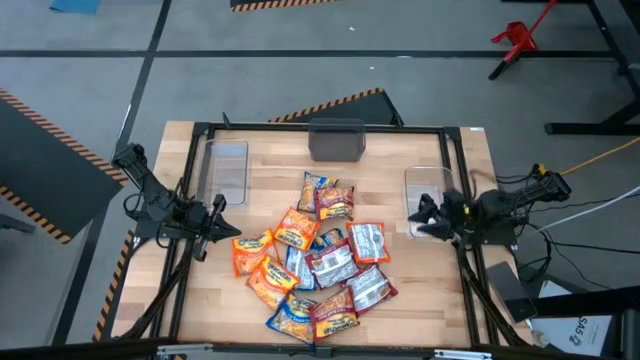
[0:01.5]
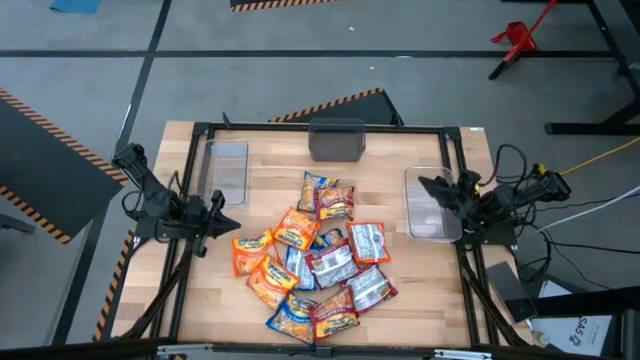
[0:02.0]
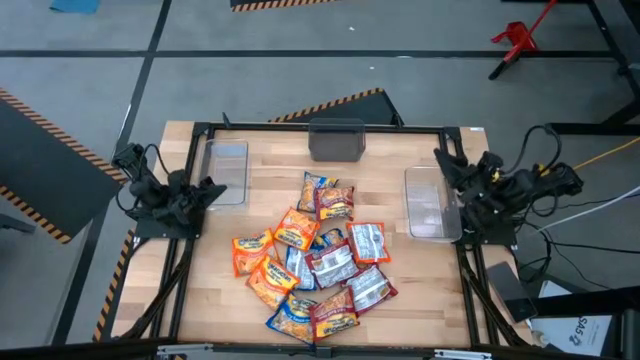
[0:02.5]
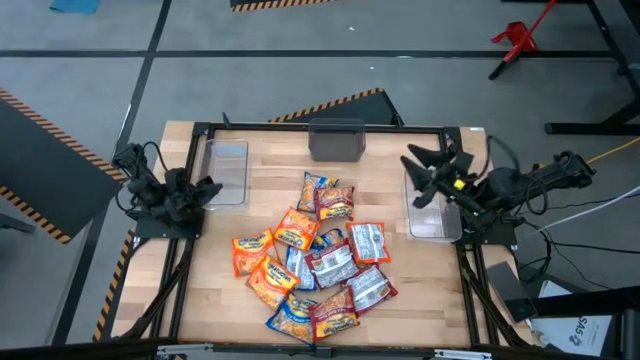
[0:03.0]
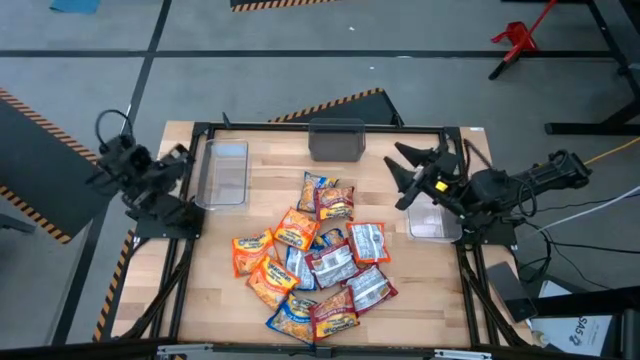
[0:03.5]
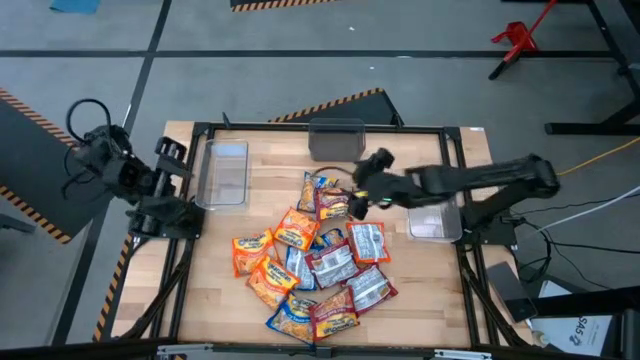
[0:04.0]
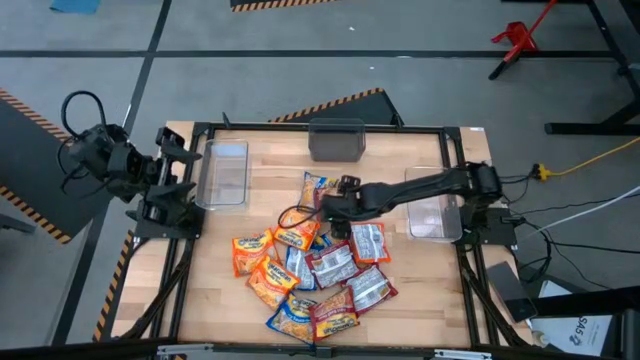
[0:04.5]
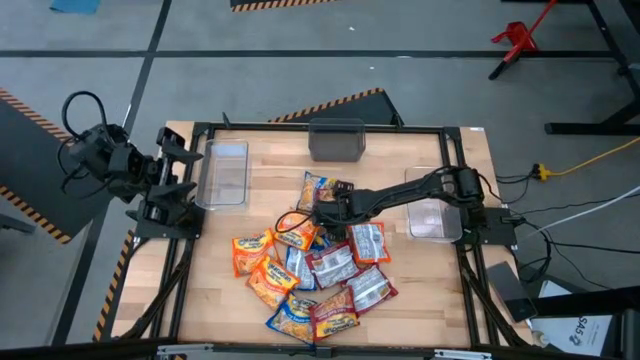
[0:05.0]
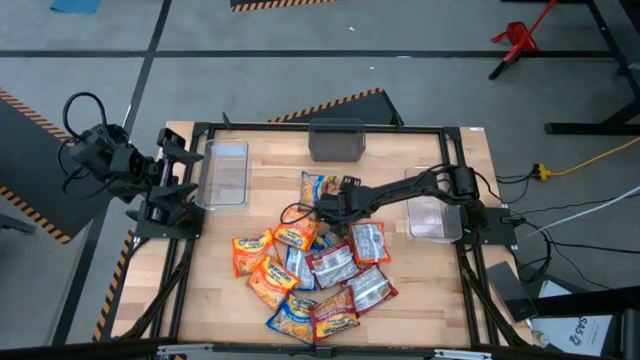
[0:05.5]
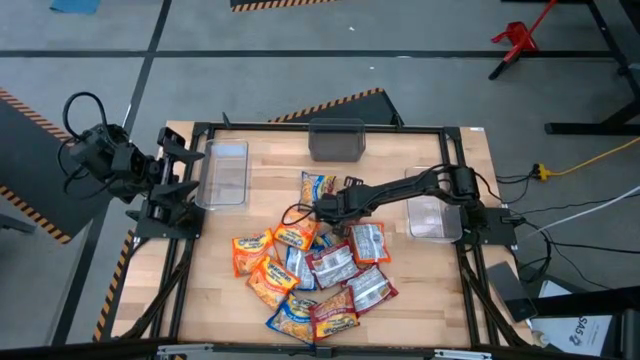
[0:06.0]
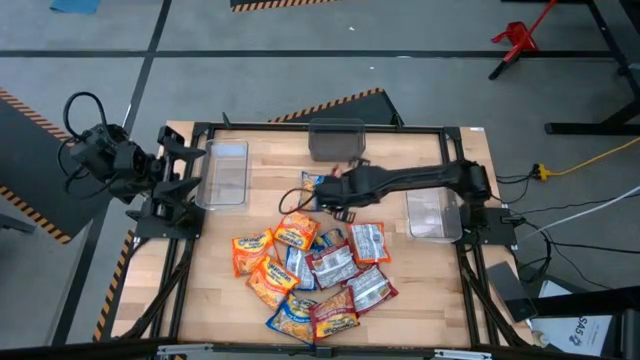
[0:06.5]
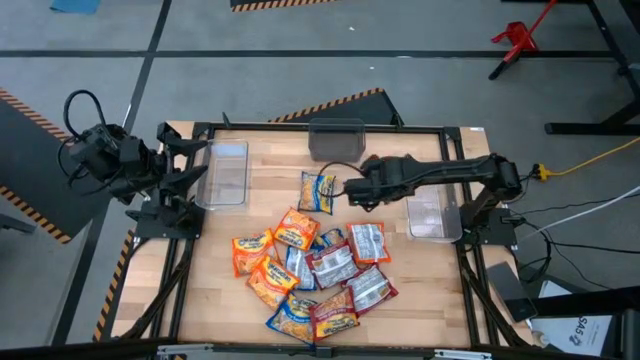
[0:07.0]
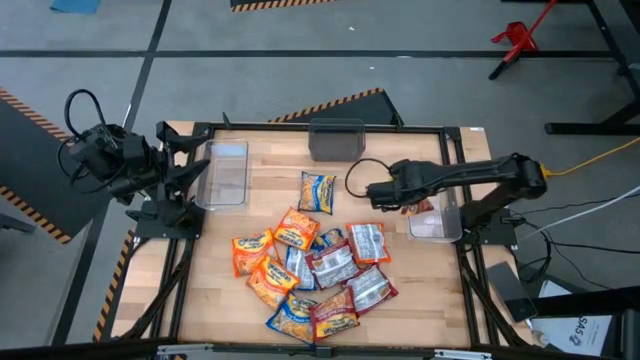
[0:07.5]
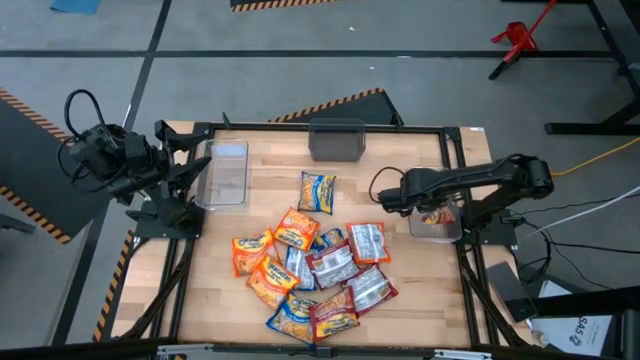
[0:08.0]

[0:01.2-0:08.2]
Task: Sort Maruchan noodles
Put the red noodle pack into the right transparent bin

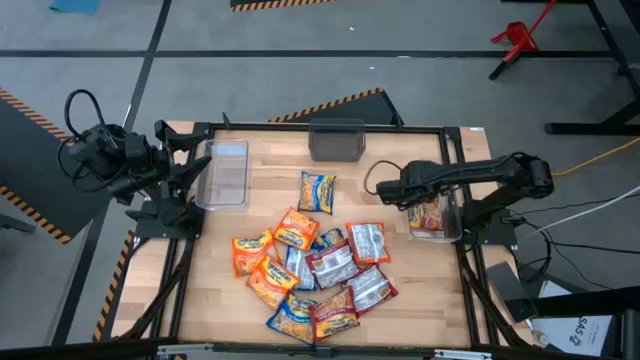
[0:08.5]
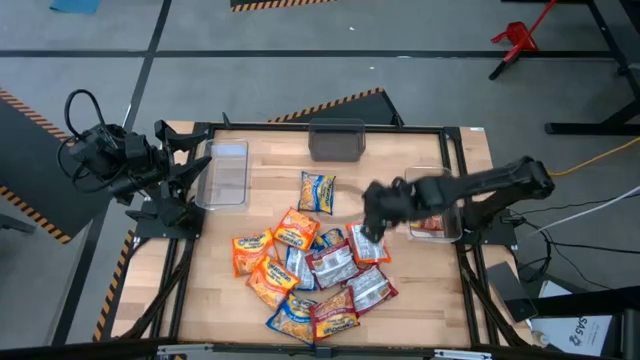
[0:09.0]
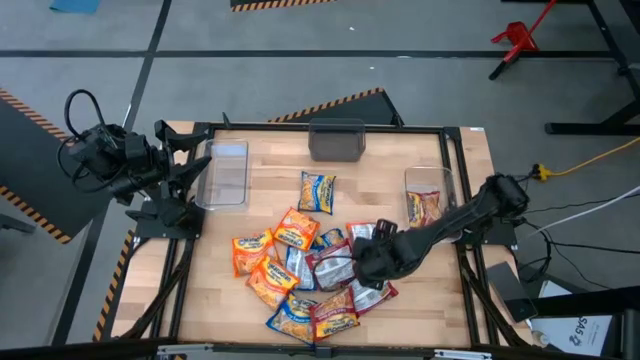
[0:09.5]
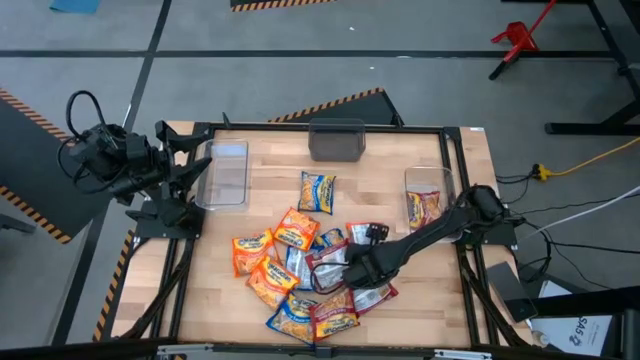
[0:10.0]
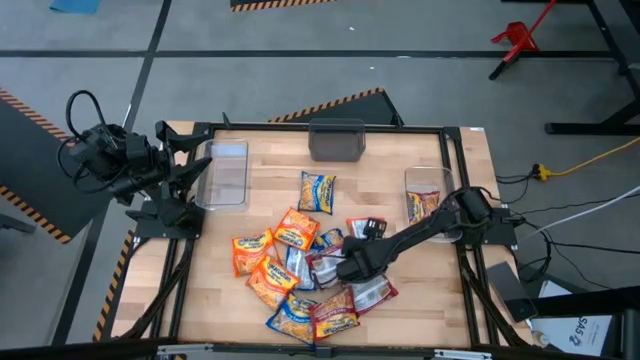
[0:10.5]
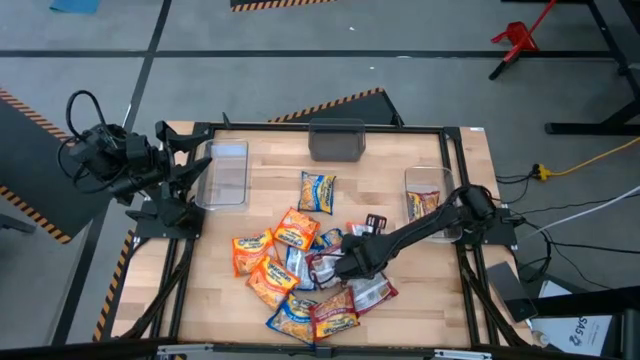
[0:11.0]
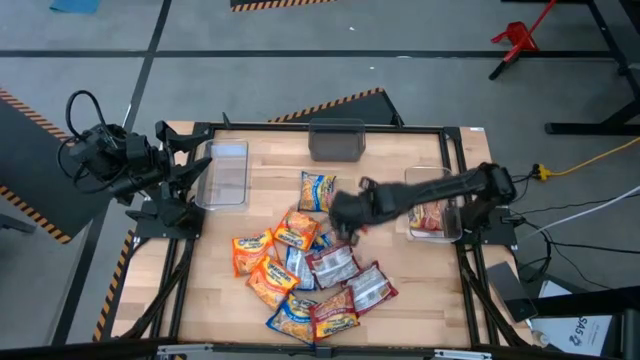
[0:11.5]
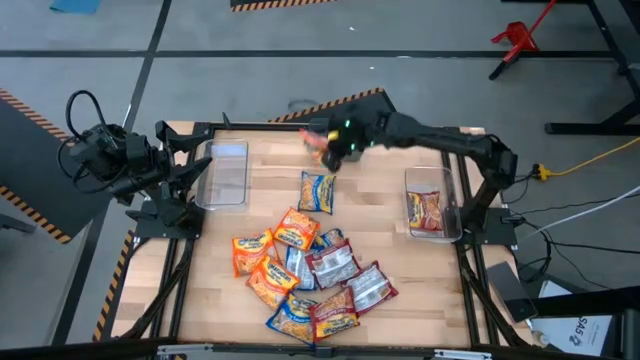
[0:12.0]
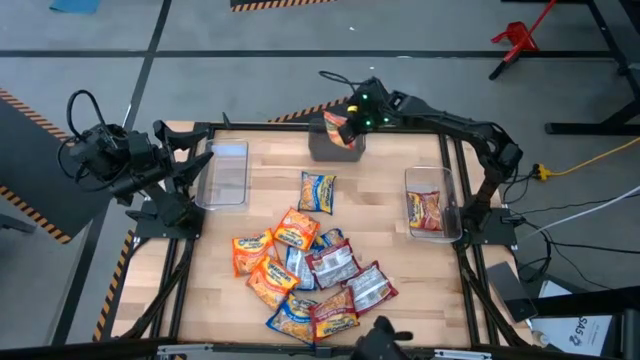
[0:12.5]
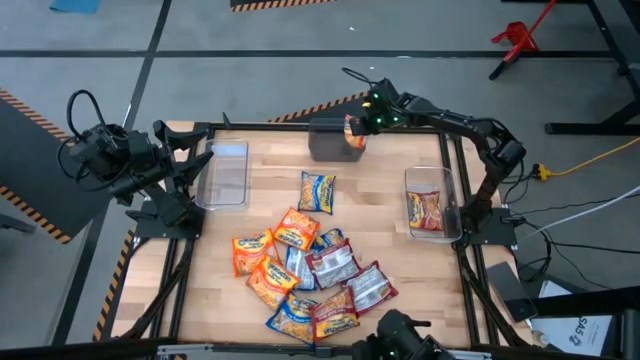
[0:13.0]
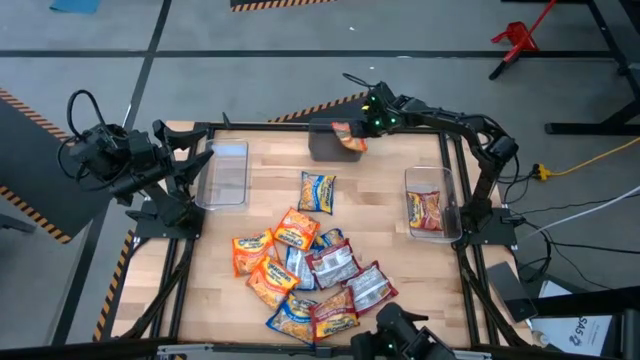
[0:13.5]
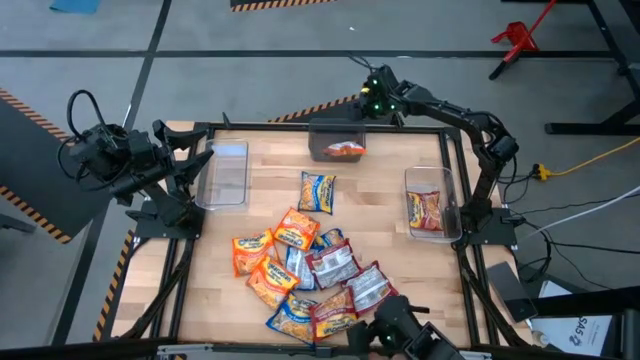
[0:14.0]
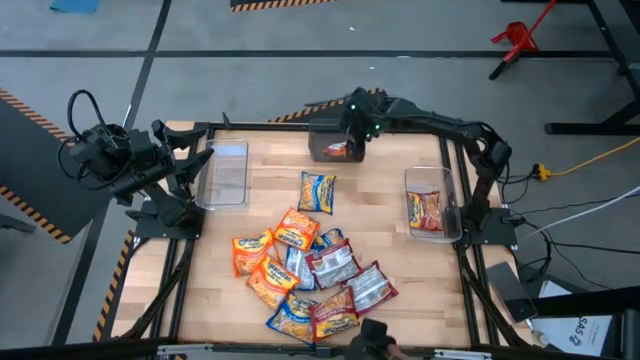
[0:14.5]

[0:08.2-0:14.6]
Put the orange noodle pack into the black bin

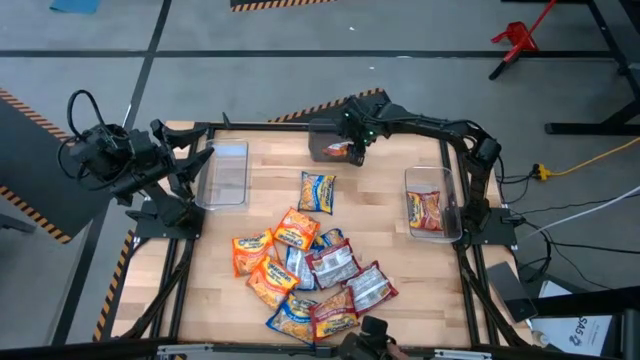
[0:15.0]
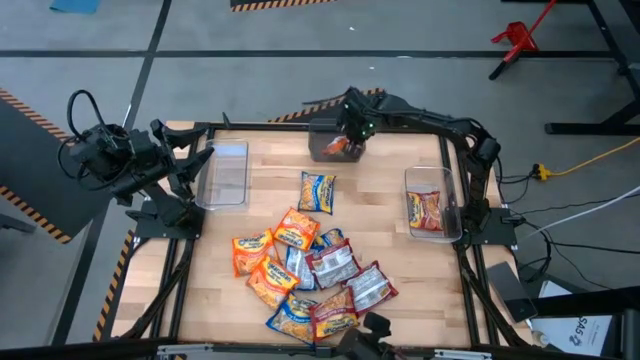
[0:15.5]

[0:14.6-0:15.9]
Put the orange noodle pack into the black bin

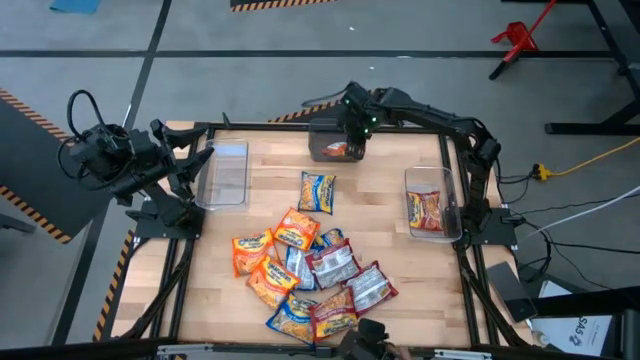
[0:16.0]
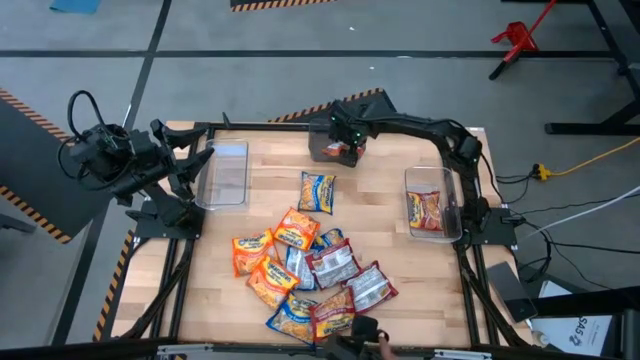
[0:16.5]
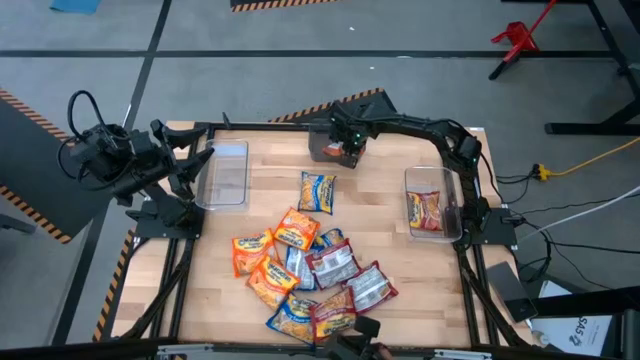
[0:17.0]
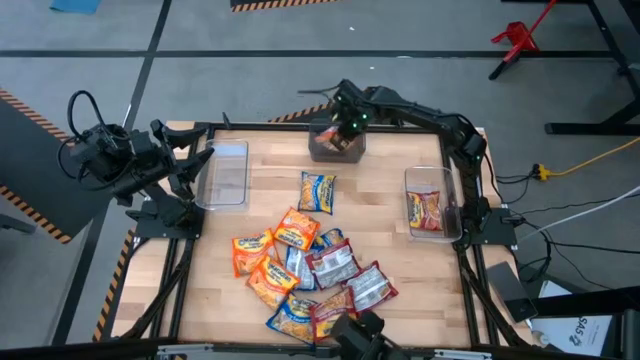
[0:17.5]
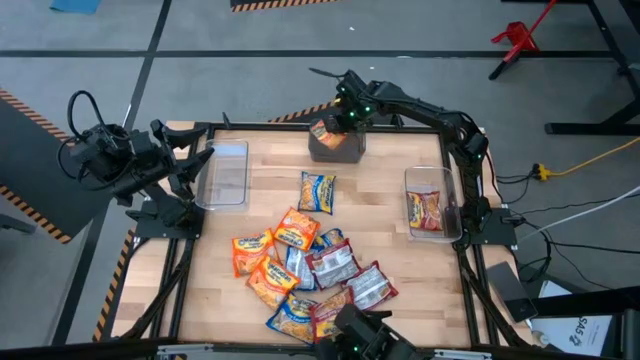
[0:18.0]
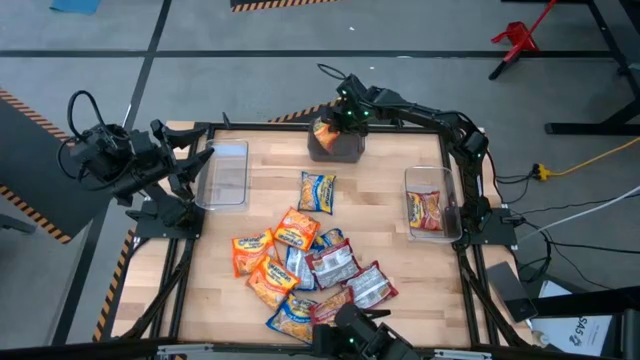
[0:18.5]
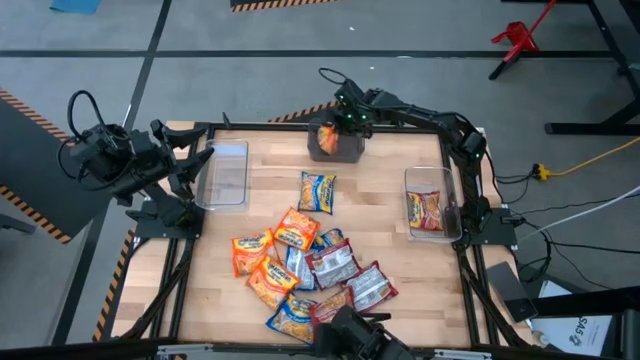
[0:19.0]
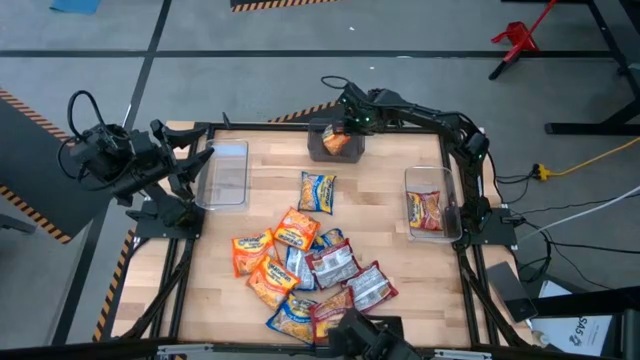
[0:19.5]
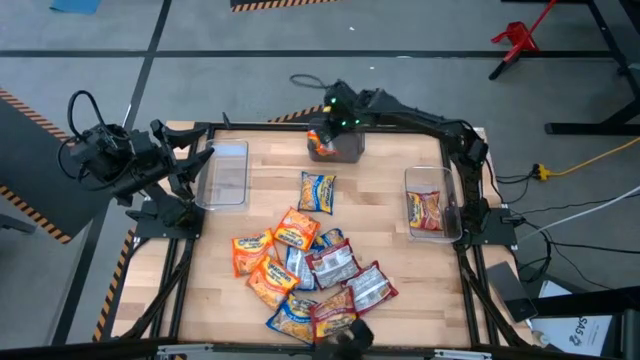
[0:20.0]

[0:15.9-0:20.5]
Put the orange noodle pack into the black bin

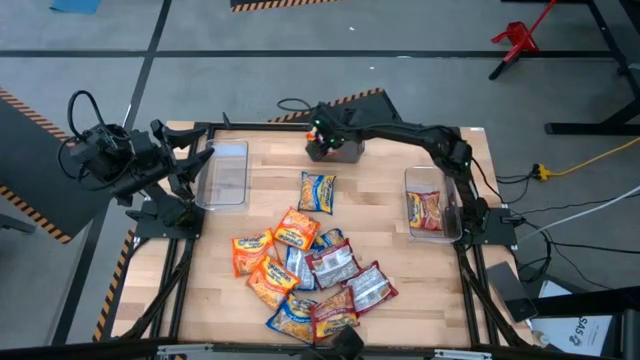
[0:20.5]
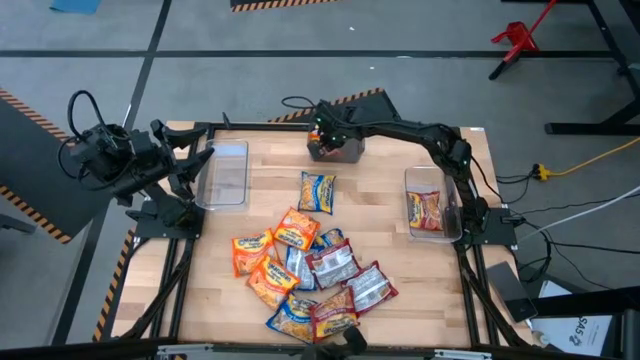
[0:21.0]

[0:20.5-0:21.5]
Put the orange noodle pack into the black bin

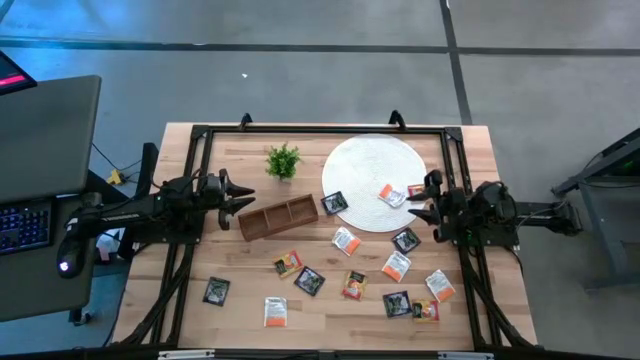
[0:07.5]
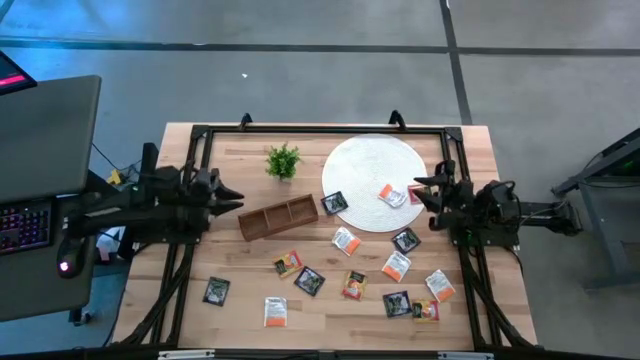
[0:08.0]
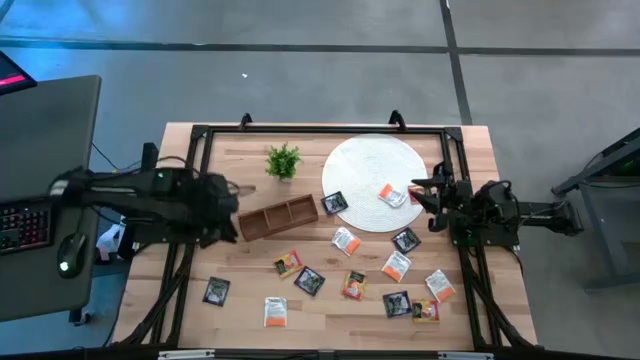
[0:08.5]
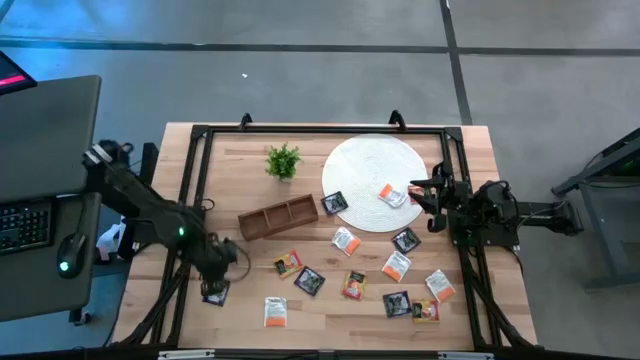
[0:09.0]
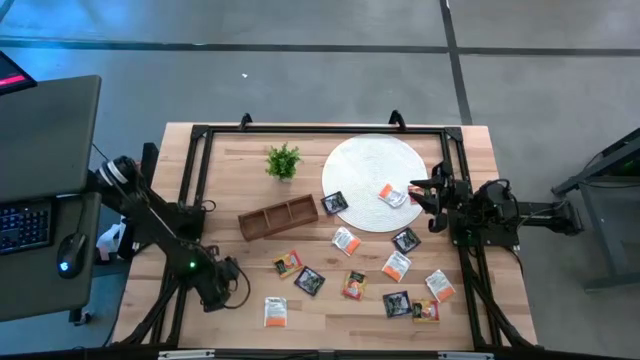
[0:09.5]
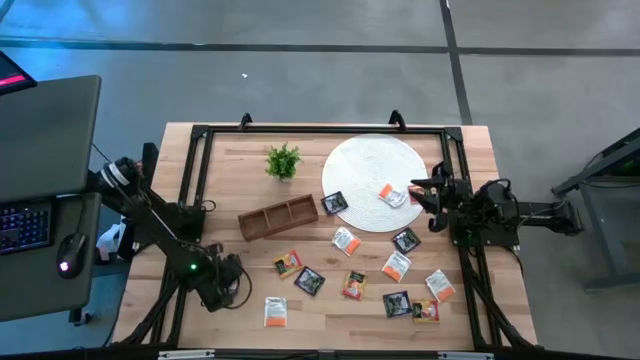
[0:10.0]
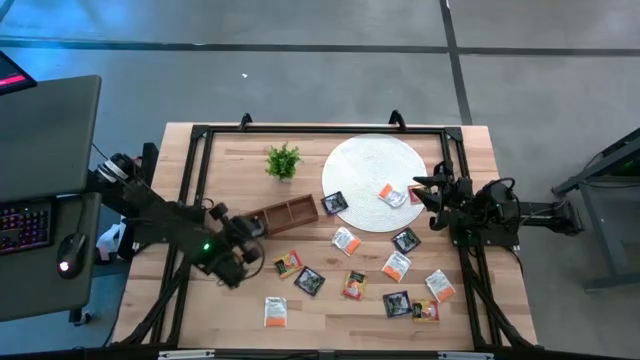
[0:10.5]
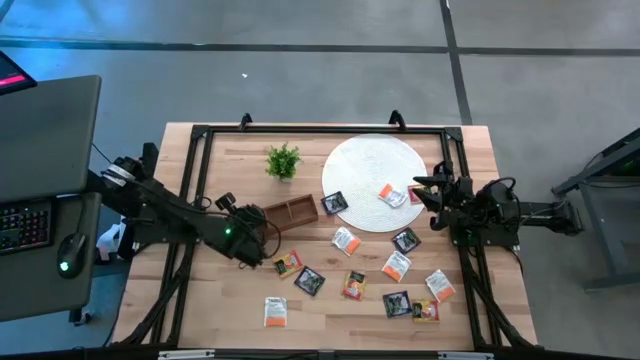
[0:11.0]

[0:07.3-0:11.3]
Task: Pick & Place Tea
Put the purple tea bag into the left section of the wooden organizer
